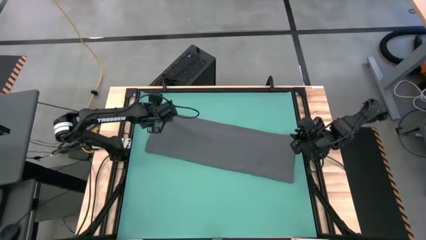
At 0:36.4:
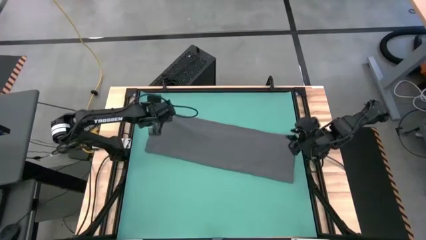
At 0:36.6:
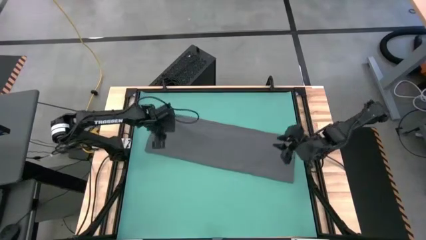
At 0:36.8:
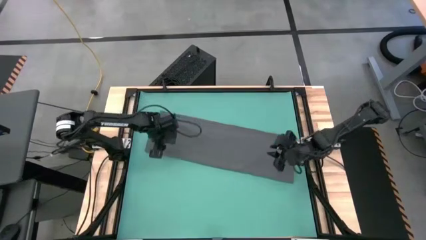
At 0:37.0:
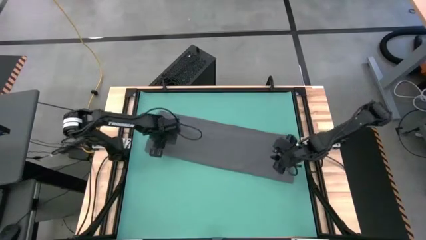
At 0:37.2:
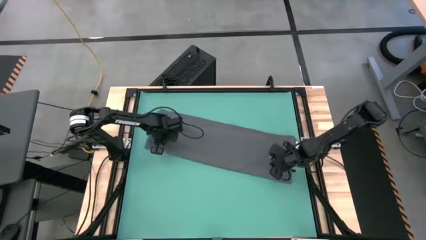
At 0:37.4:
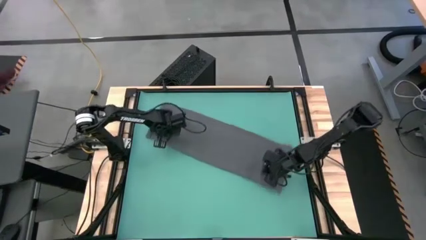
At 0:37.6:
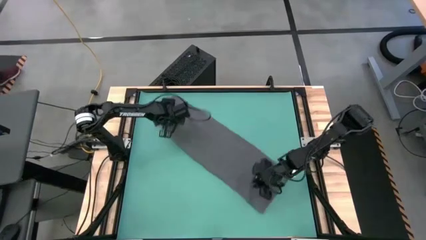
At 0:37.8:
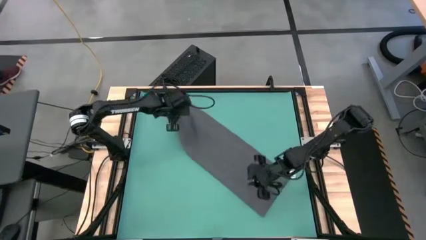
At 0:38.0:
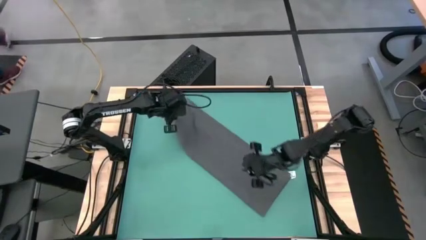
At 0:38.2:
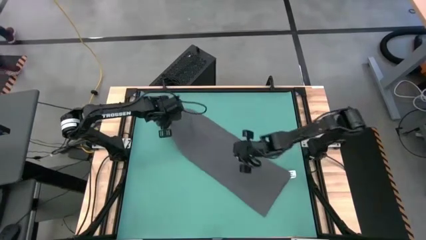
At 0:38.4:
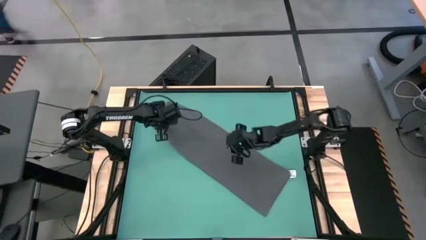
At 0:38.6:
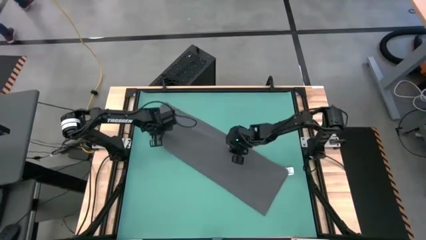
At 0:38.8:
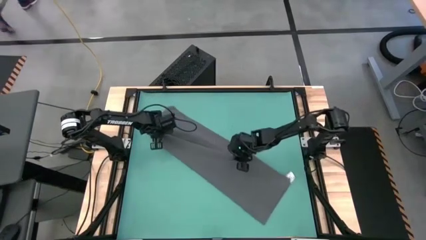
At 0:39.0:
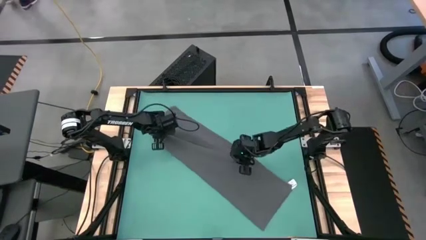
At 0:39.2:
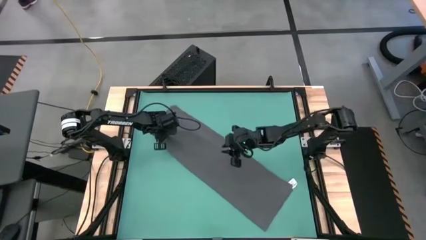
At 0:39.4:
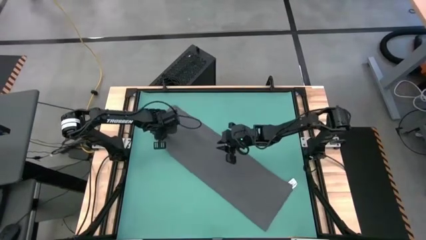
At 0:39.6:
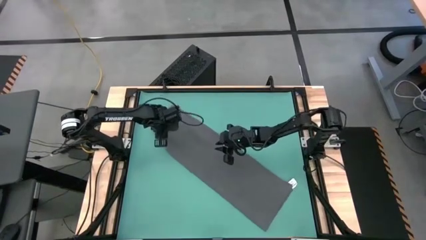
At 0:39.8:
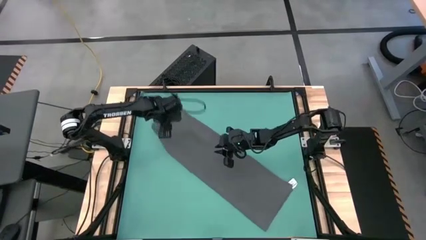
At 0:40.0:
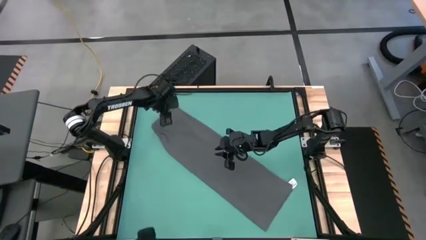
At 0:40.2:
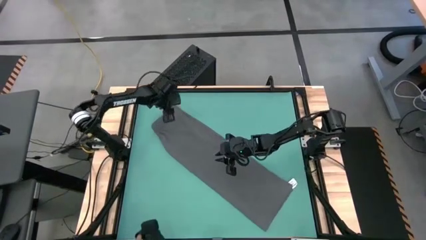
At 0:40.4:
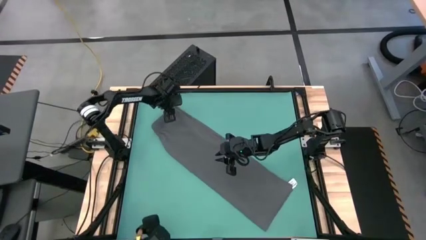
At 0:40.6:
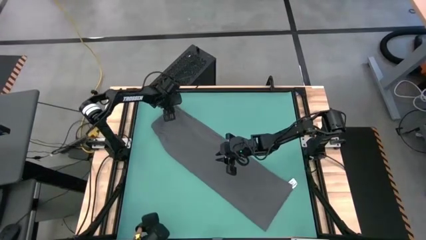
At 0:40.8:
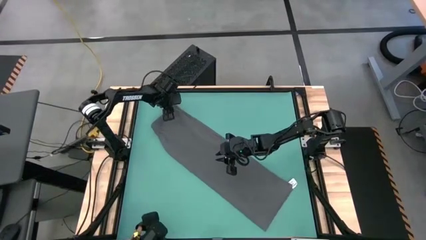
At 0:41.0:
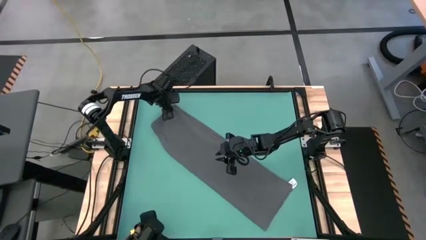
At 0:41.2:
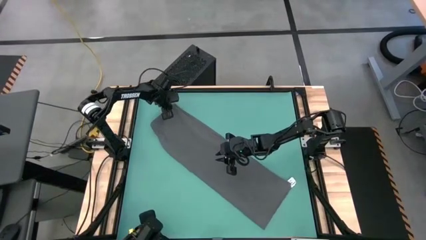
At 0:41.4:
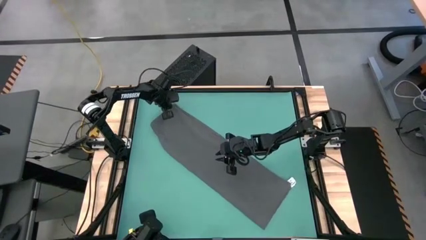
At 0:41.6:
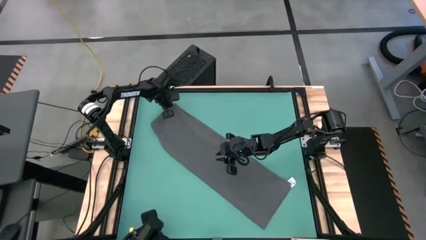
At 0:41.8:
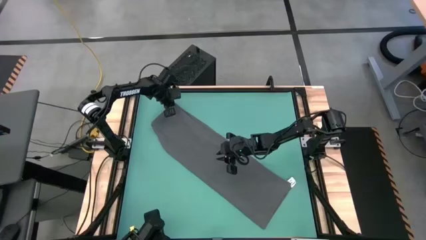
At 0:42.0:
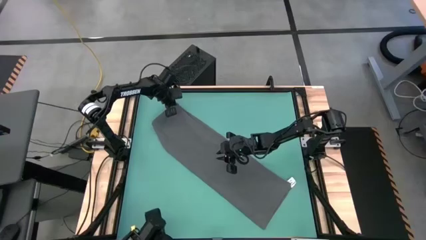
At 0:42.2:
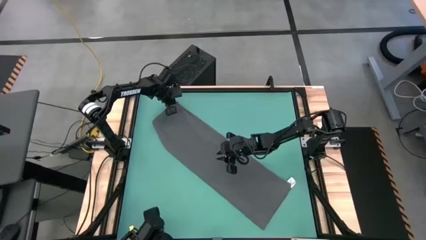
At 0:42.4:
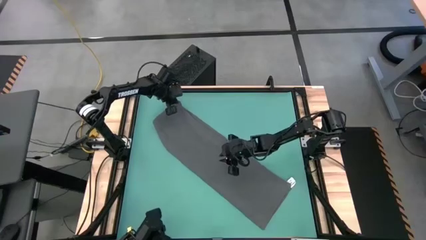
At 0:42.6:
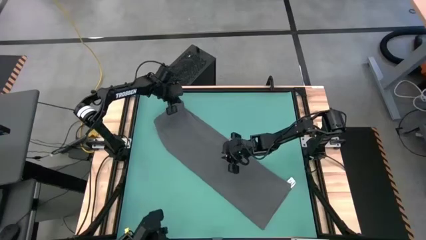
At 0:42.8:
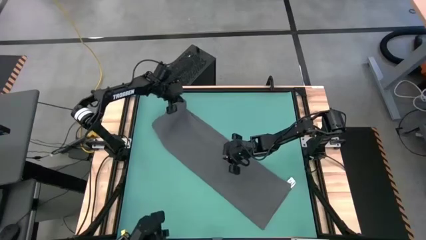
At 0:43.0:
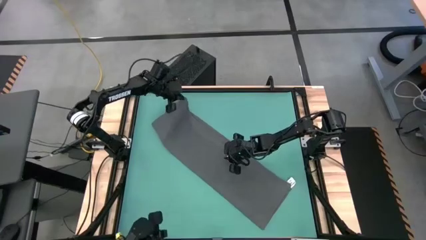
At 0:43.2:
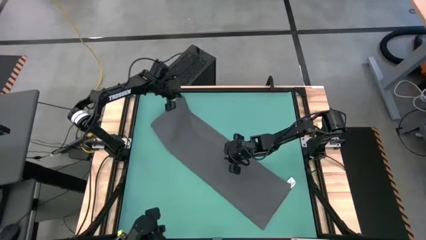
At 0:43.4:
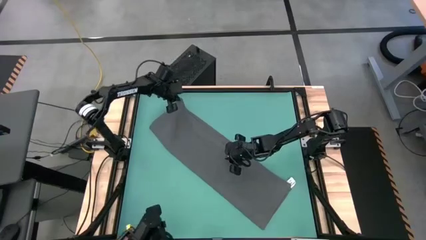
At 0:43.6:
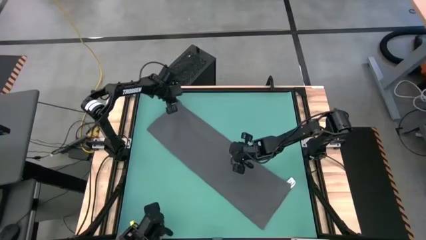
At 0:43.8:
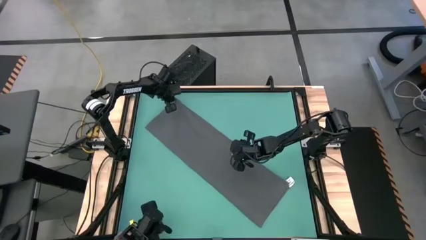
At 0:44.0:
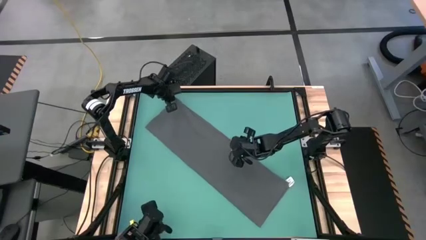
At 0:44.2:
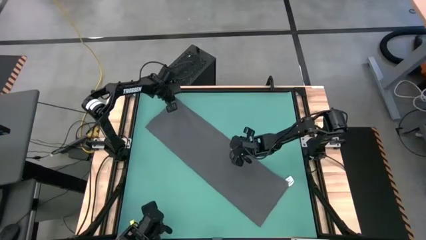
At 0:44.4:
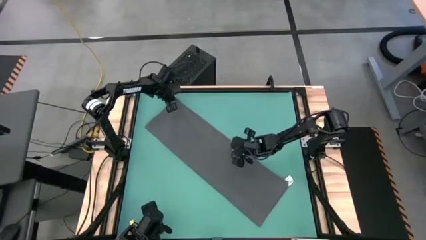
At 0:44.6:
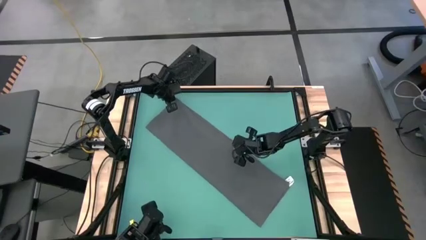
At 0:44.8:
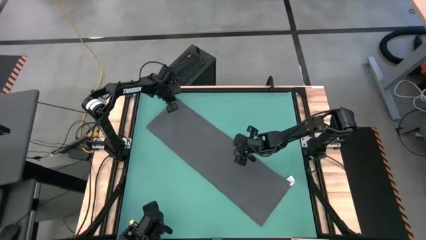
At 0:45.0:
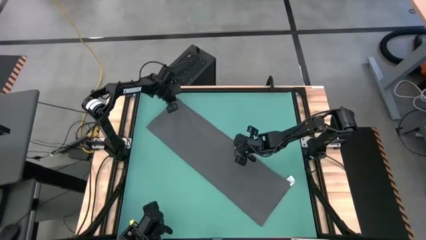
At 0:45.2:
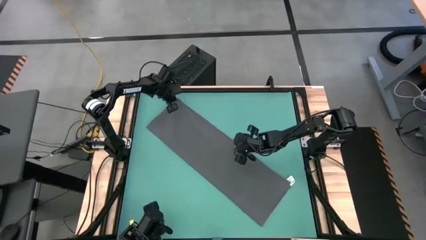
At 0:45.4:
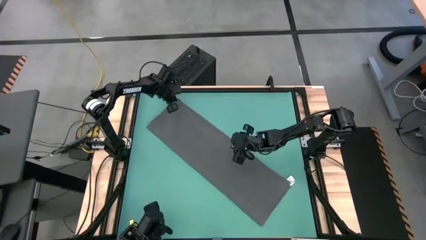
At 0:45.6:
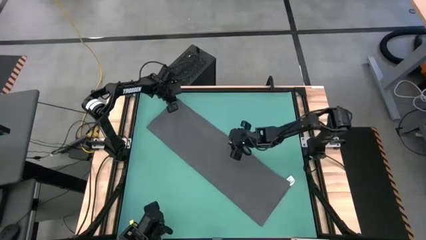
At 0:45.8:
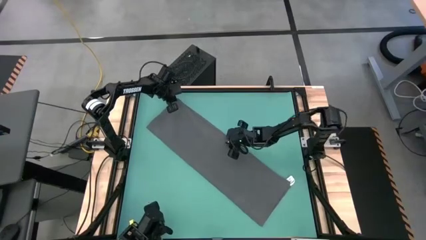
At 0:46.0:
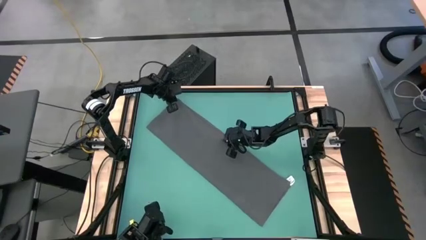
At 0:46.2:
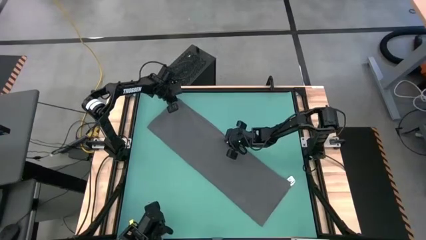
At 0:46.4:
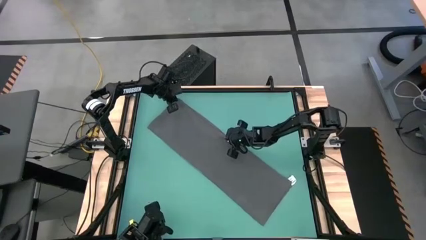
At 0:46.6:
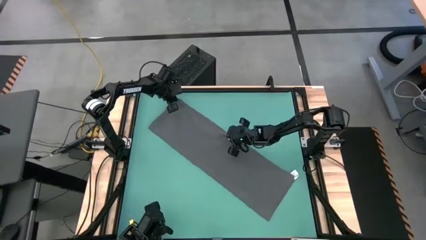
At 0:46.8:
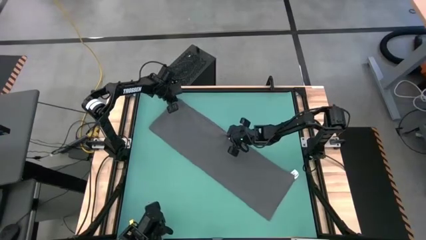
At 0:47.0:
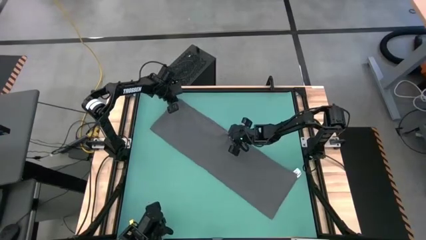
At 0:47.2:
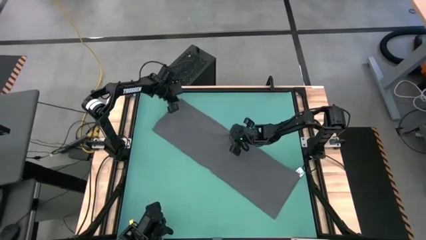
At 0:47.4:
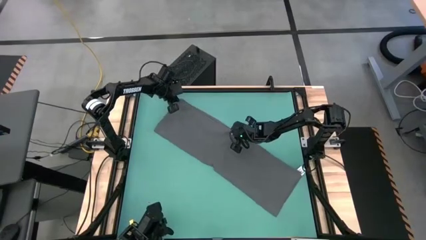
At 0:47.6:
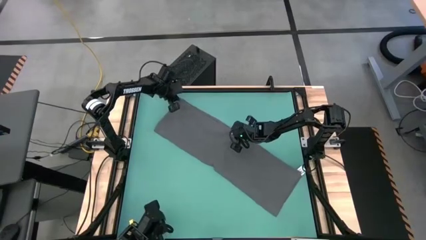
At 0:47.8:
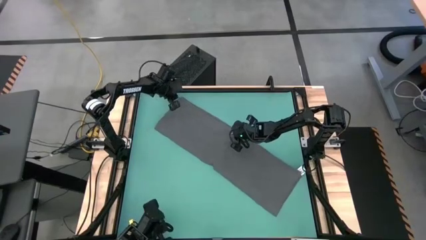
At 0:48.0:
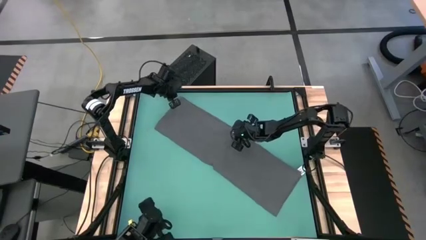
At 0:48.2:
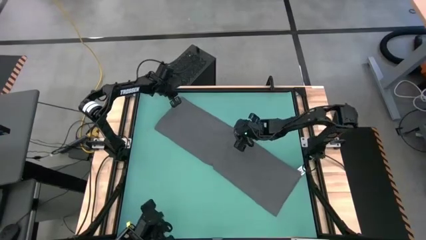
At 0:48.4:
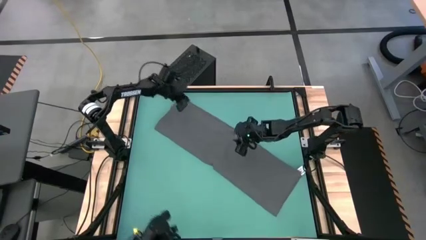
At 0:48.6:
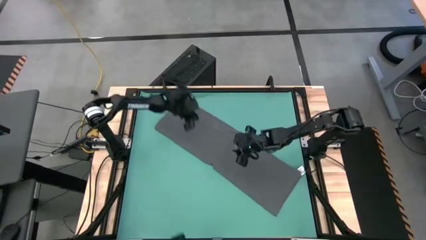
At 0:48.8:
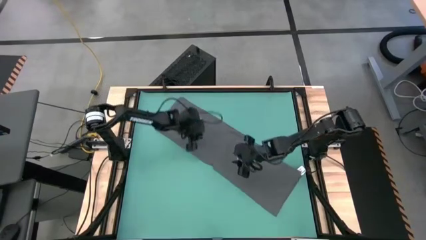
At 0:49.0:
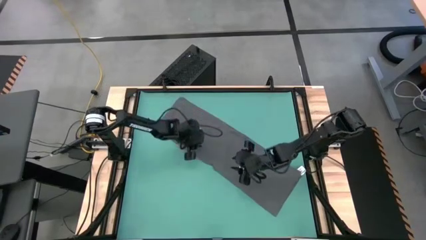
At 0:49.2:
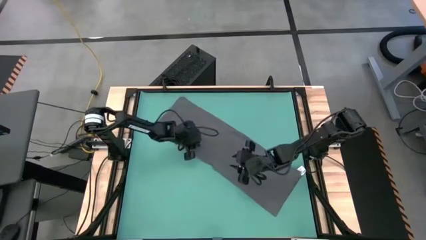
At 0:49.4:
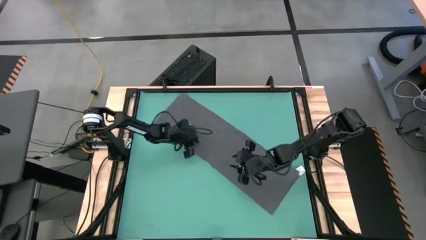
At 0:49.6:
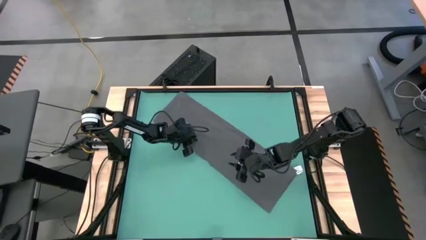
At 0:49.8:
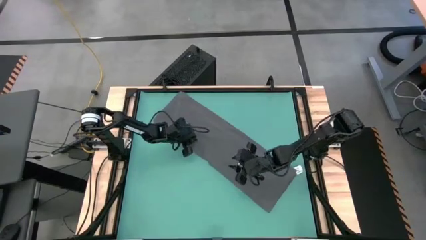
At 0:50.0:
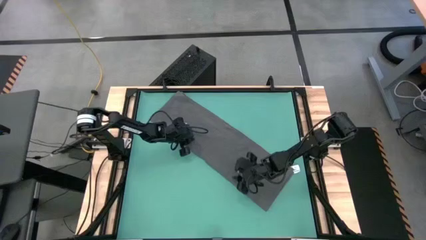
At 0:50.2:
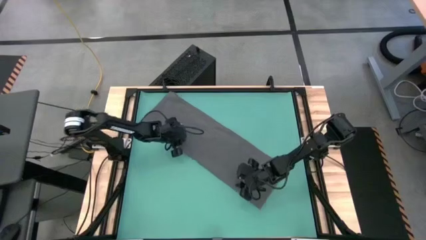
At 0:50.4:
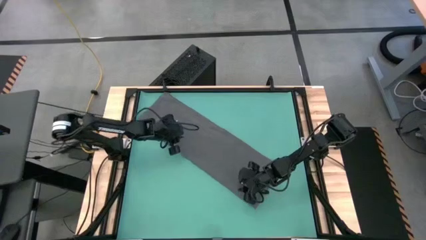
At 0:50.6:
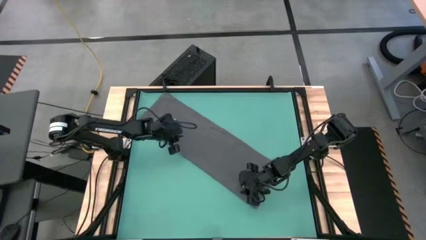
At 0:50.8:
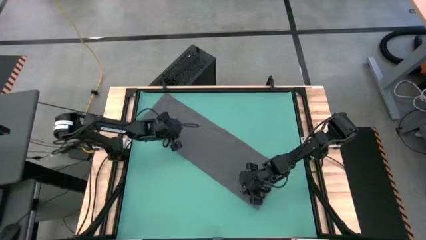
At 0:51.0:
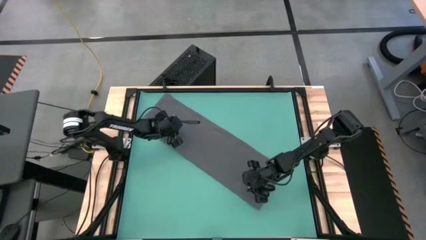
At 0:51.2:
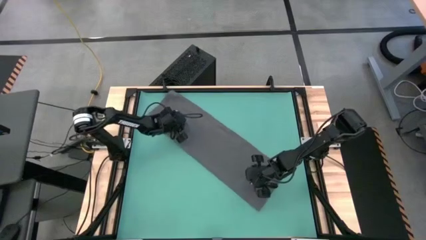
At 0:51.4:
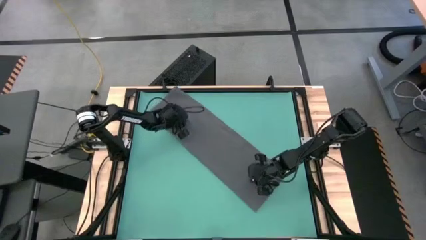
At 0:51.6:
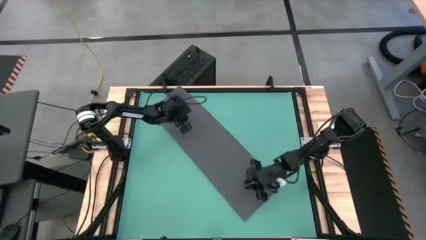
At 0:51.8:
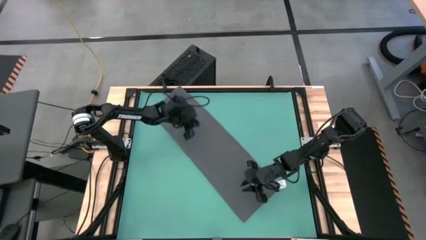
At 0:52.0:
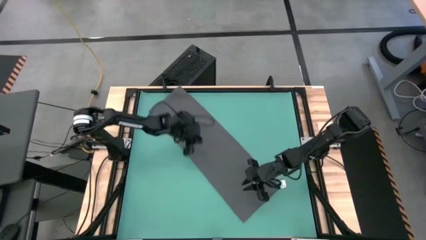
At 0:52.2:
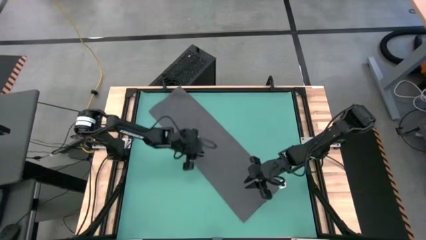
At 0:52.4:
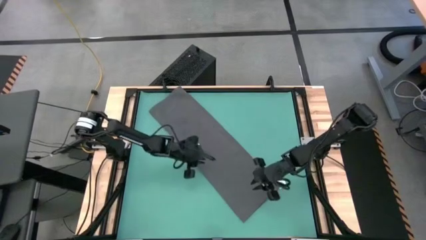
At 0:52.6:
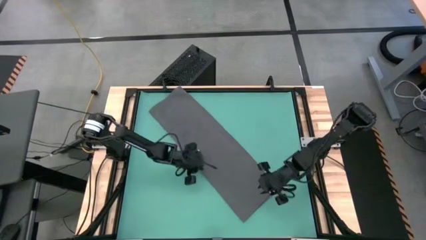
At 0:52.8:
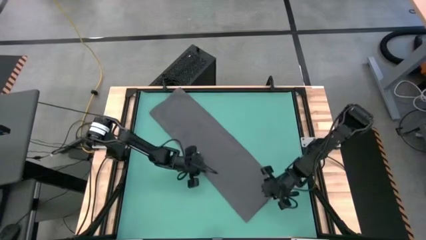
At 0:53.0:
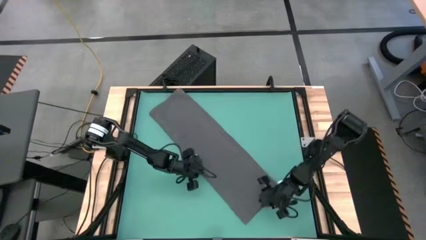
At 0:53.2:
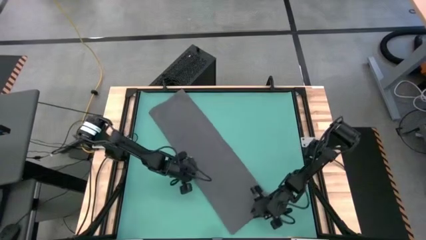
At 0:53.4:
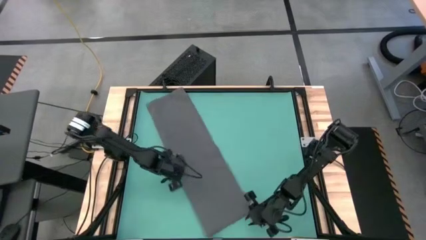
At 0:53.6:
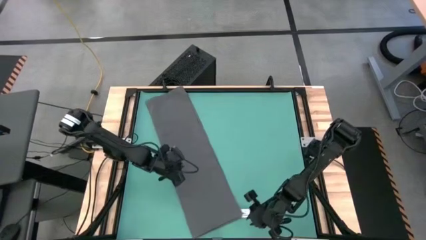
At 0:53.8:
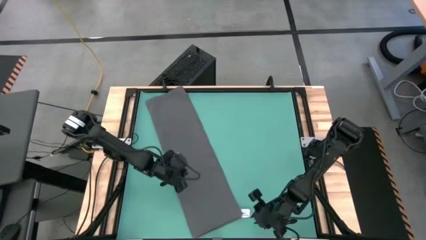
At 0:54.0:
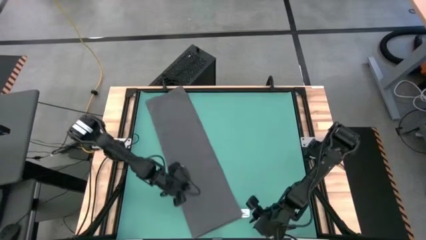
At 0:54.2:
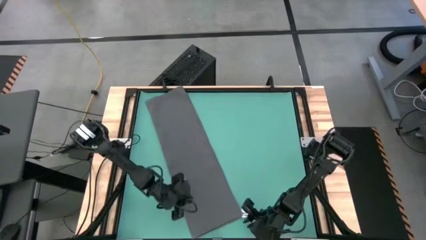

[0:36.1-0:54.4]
Task: Roll towel into tight, uniform cylinder
Roll the gray towel
